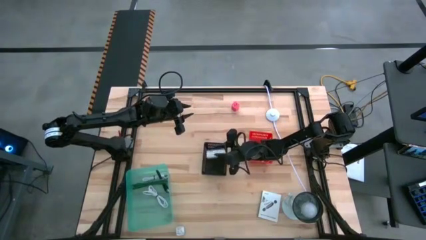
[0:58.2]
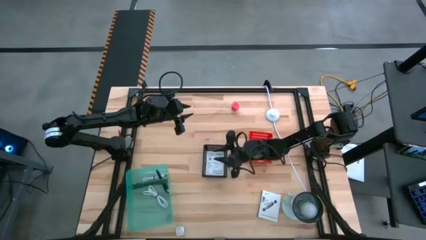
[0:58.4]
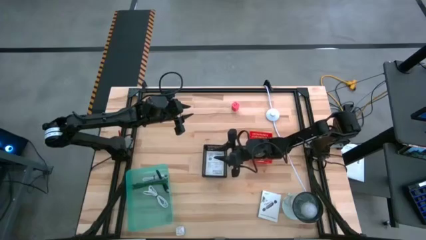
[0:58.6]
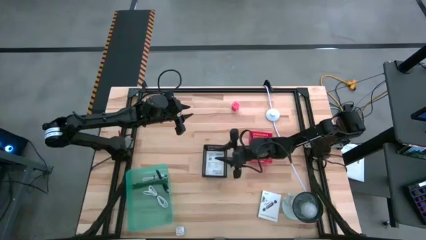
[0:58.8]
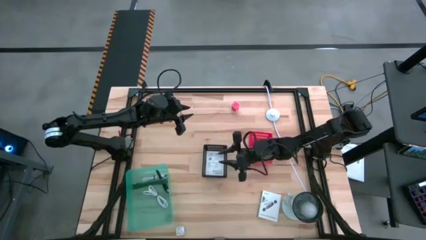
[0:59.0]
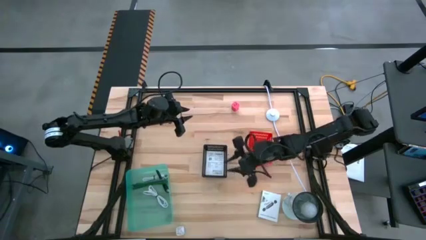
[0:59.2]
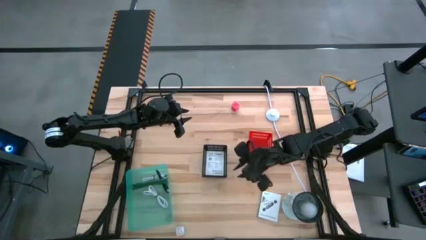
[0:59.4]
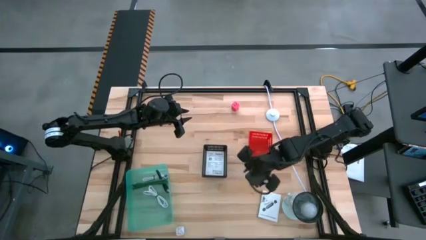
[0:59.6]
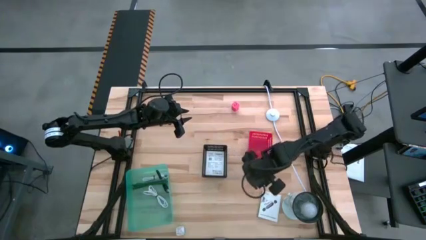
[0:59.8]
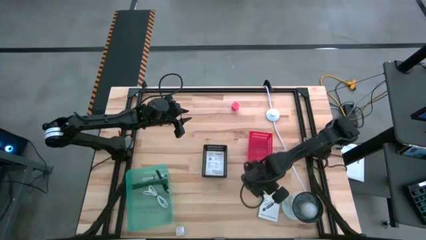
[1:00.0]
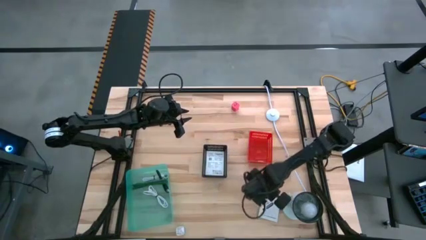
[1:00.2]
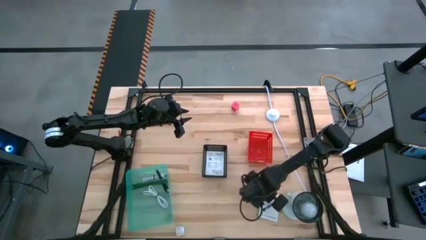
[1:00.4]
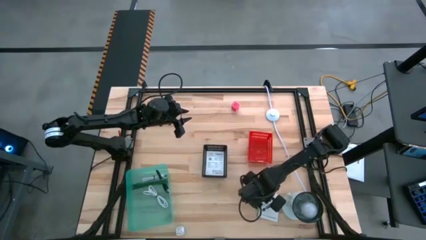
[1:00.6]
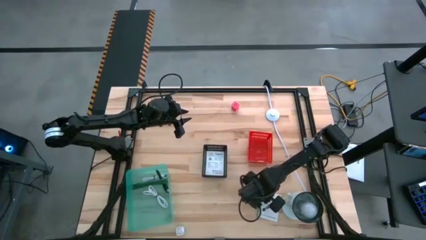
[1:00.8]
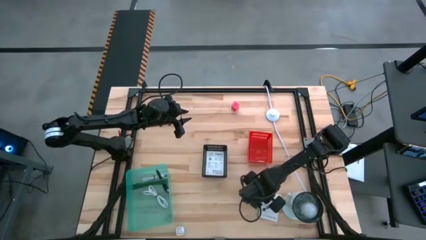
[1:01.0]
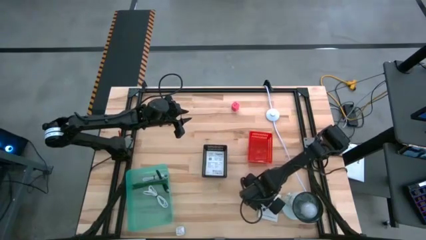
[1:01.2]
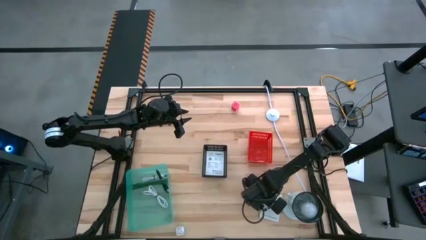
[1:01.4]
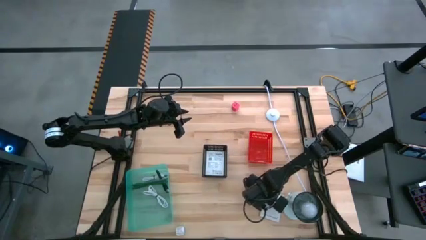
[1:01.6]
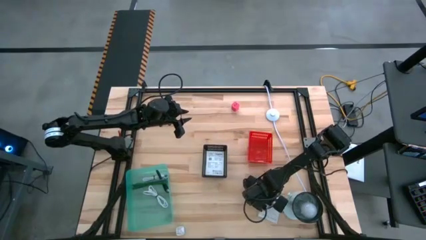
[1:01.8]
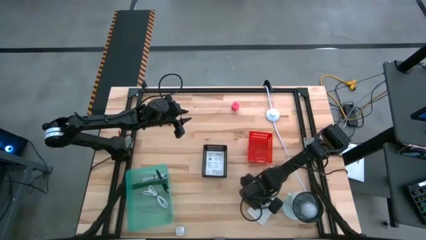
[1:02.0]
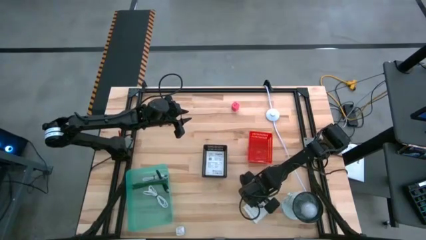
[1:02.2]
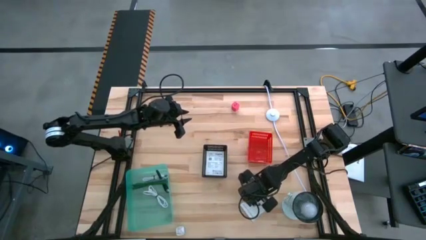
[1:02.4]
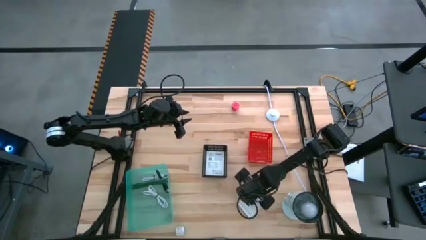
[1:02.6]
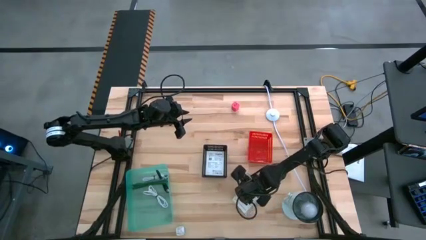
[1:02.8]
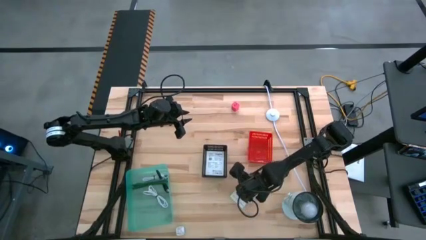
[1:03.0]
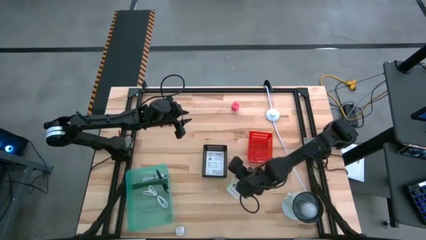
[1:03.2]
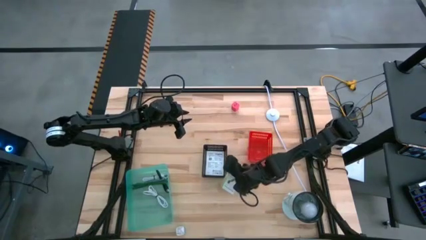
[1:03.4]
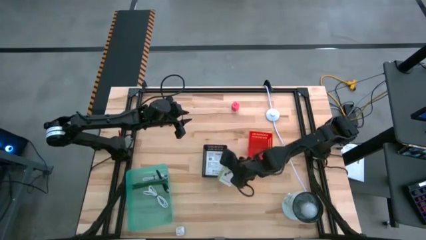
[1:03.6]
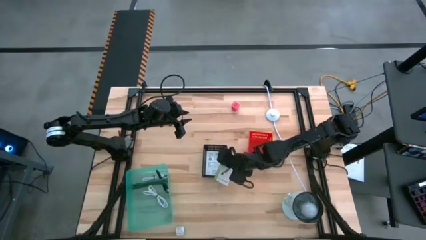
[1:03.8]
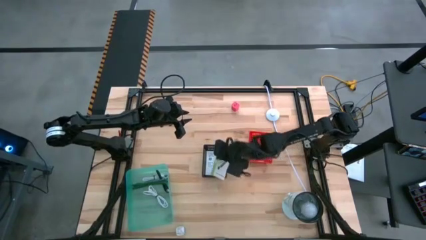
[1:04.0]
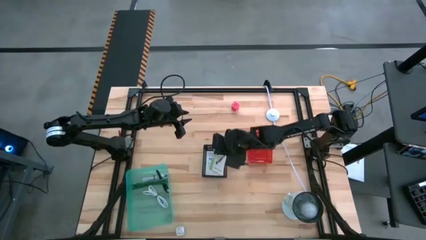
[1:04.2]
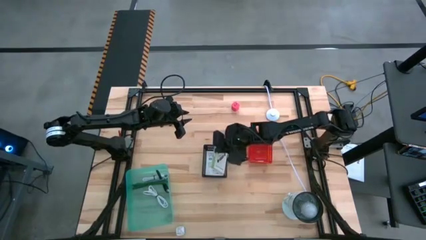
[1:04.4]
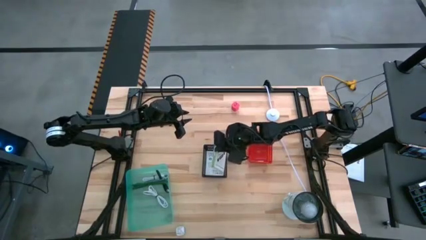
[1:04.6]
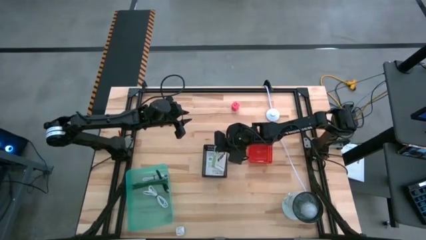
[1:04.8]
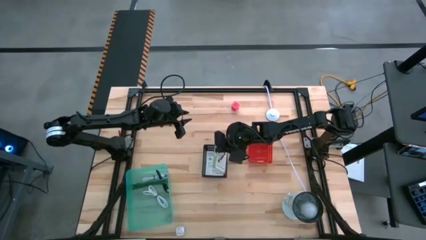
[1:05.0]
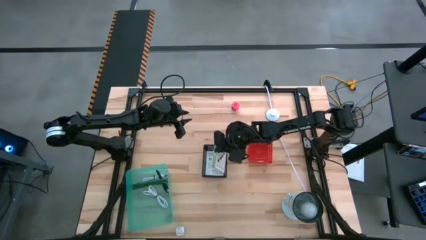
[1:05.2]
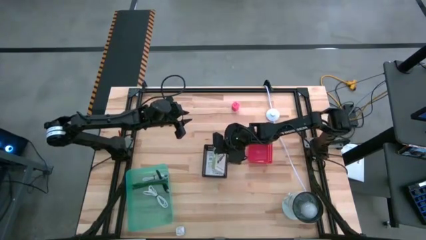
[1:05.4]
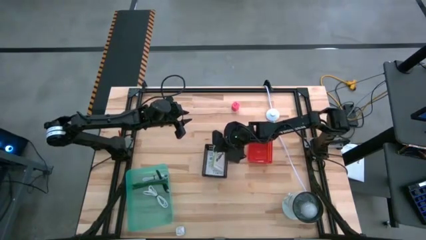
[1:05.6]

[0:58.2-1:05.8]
Task: Pick and place items into bin
Put the white card reader box into the black bin

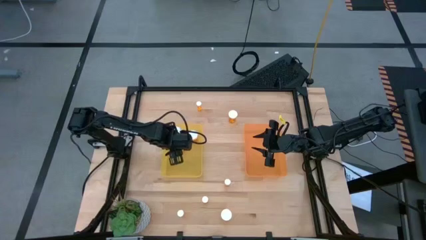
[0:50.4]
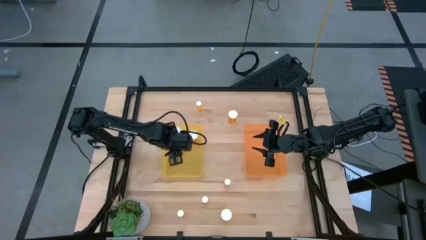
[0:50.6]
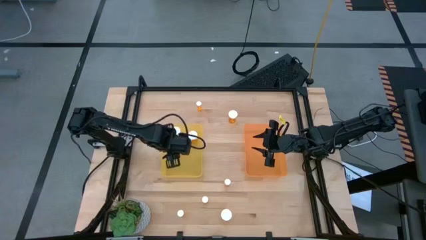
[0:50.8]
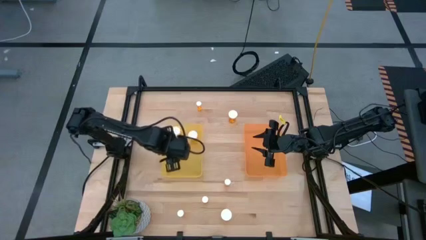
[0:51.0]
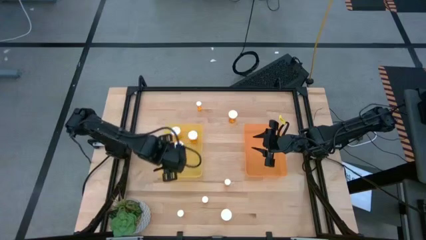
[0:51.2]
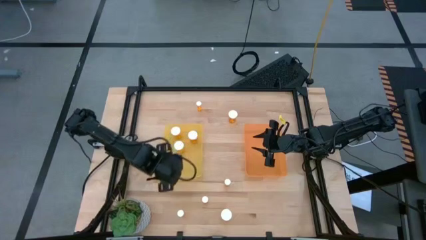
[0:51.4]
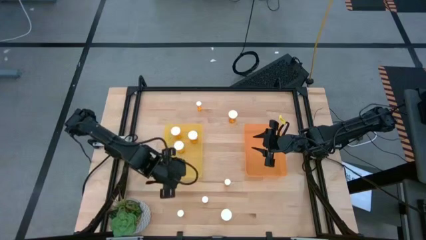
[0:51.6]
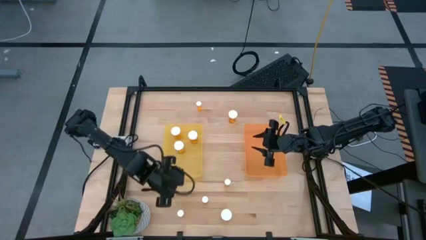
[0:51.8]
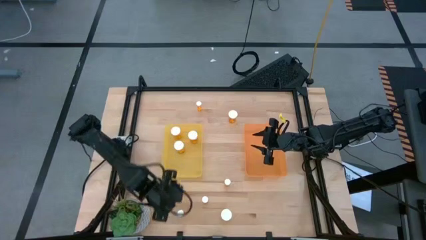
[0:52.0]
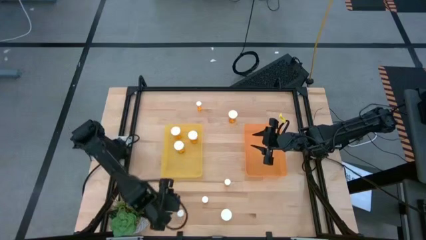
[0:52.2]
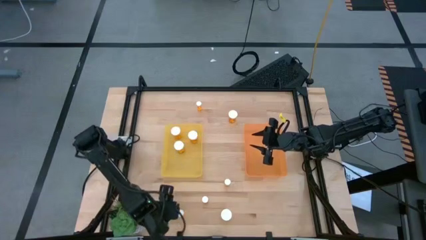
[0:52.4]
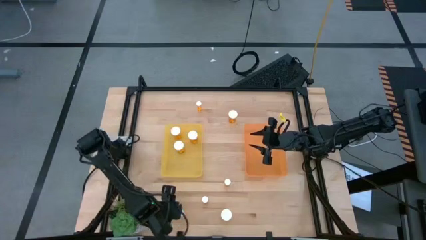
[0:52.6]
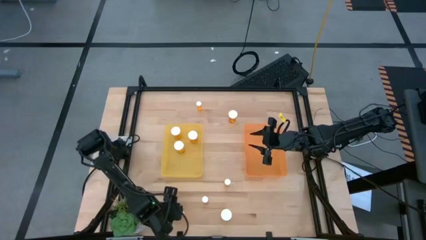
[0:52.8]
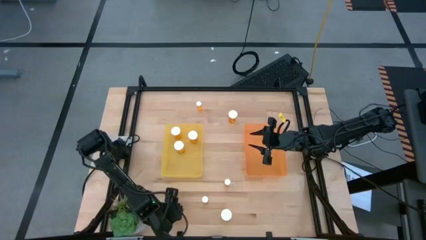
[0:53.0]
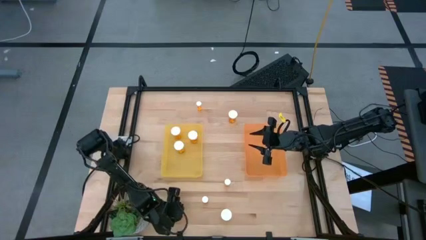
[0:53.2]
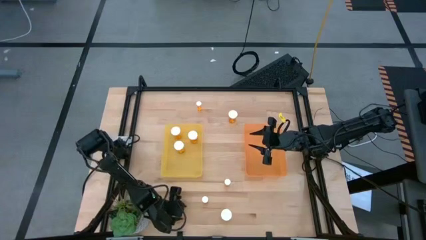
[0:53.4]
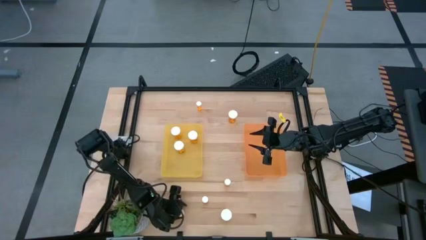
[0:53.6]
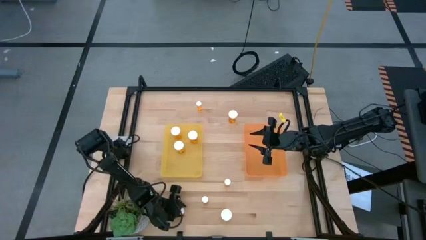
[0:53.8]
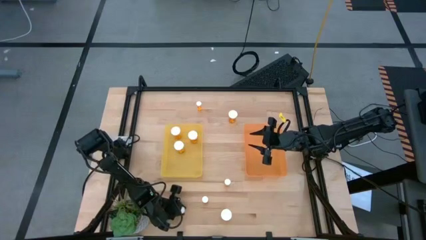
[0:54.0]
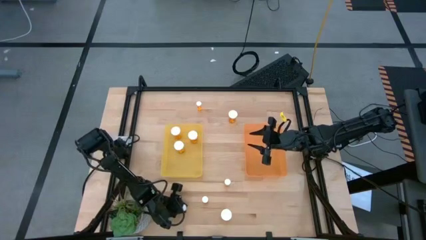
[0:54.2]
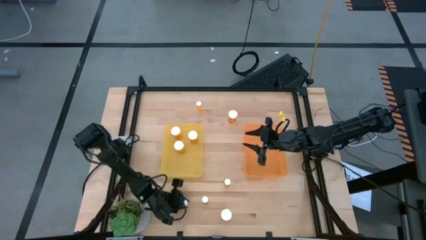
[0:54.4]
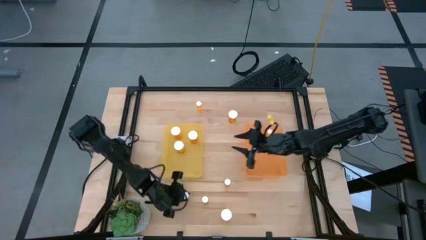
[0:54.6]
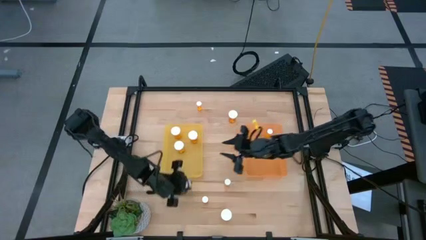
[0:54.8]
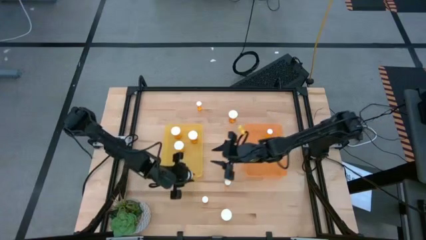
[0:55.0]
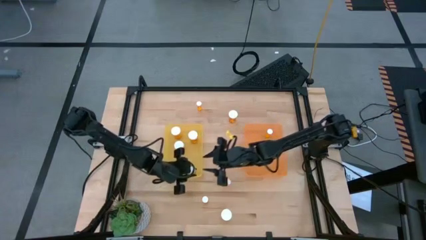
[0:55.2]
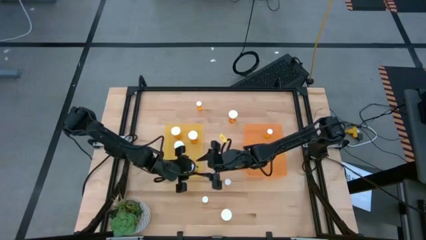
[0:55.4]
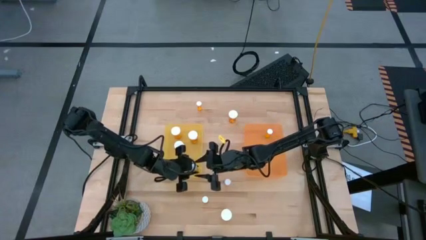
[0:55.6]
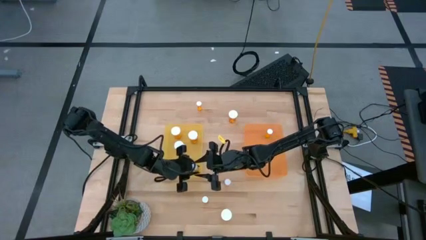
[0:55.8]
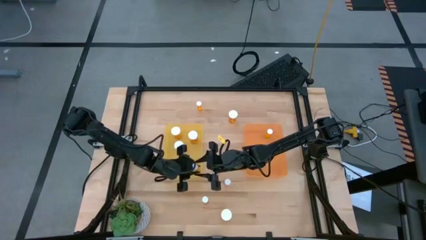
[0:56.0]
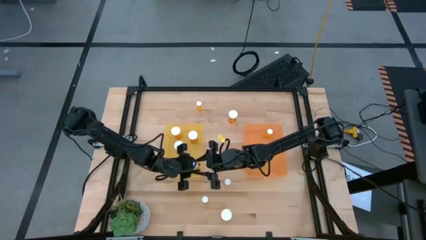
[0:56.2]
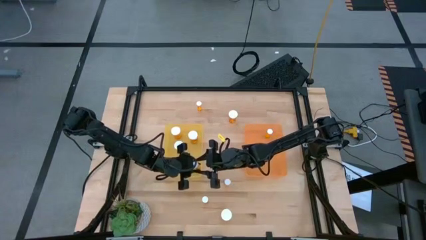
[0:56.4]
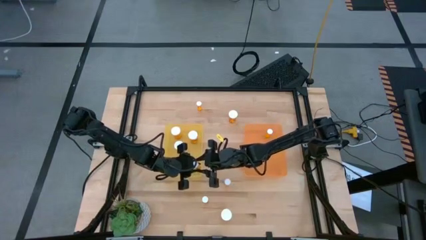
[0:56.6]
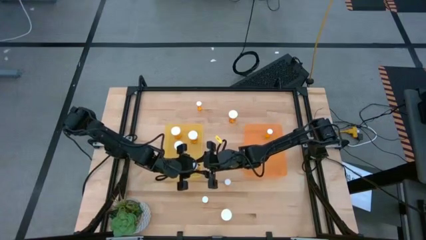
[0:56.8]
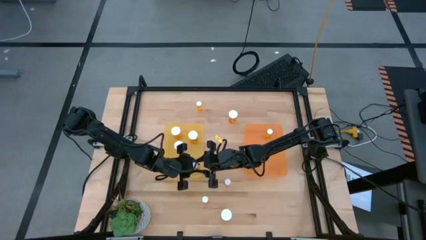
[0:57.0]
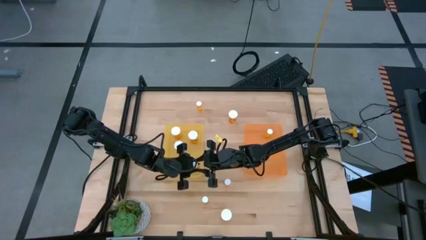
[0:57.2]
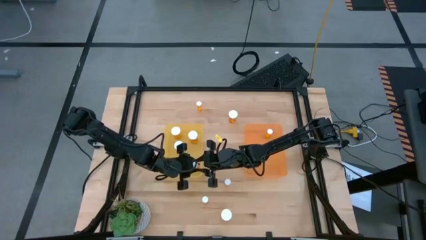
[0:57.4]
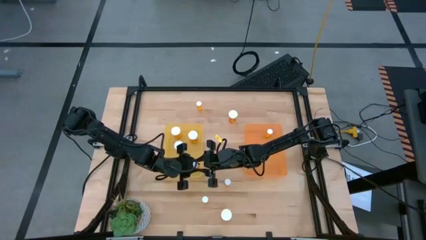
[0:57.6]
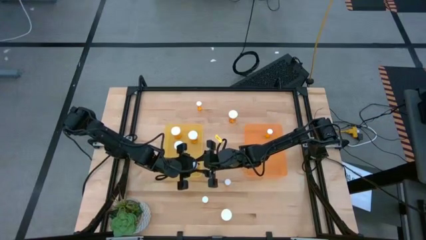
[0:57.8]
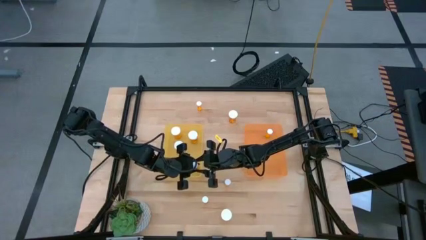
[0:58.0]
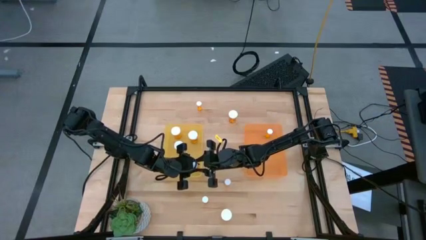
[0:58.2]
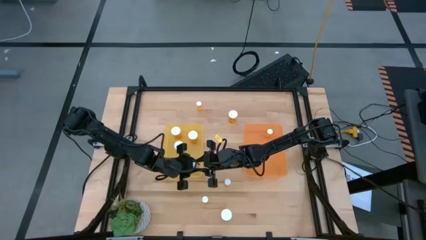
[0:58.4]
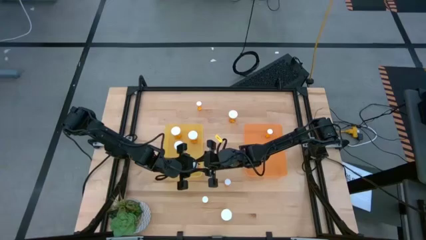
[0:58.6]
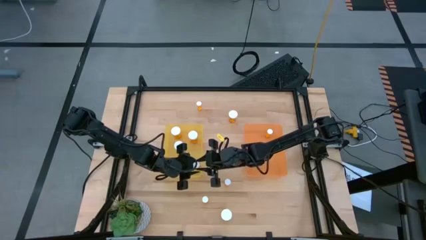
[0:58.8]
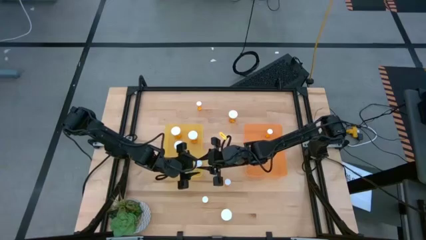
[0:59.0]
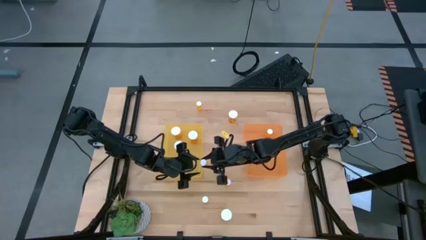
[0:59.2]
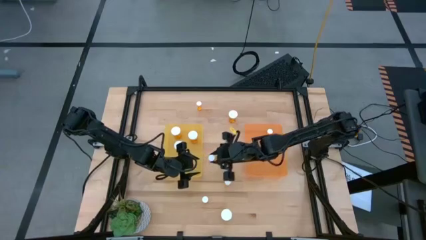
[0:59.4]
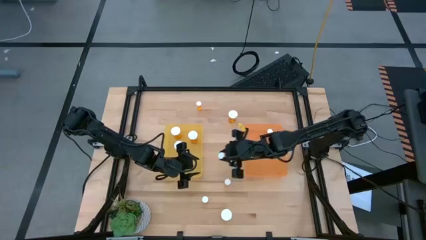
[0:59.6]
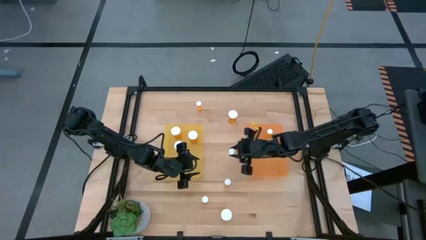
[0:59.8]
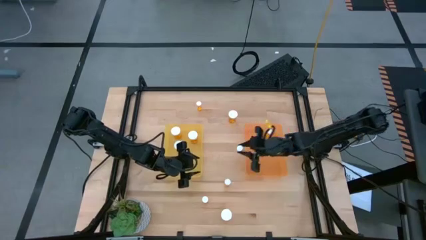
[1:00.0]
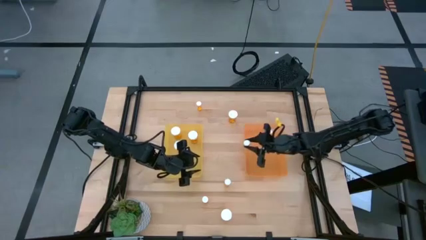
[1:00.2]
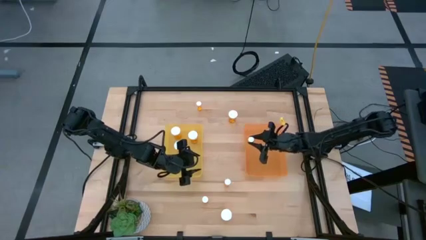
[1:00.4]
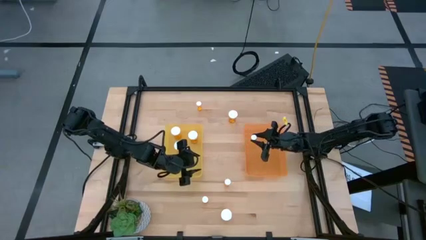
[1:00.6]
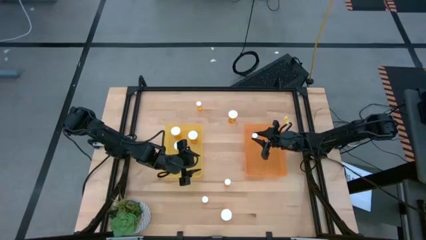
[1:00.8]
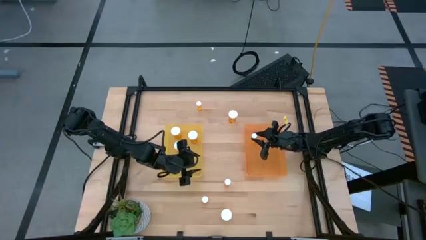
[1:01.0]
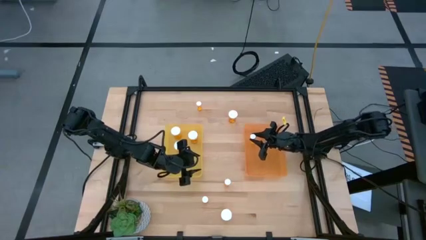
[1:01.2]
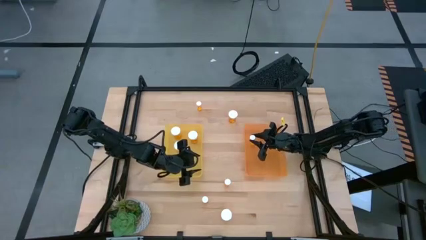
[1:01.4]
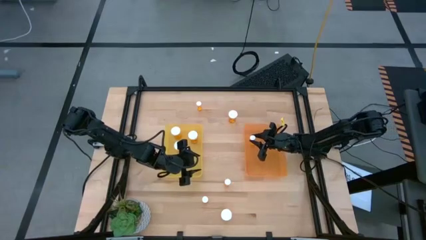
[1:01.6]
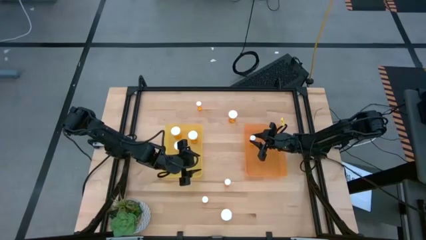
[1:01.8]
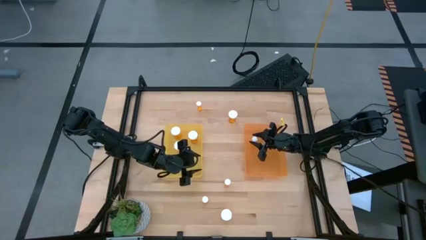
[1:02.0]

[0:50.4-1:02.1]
Task: Pick and place medicine bottles into bin by pill shape (circle, oval)
Put the small orange pill bottle into the orange bin
